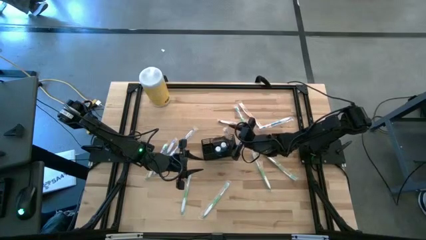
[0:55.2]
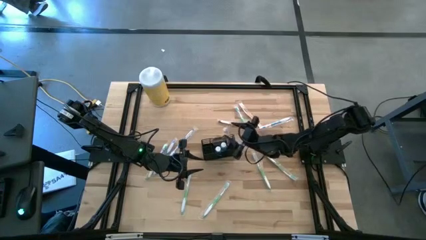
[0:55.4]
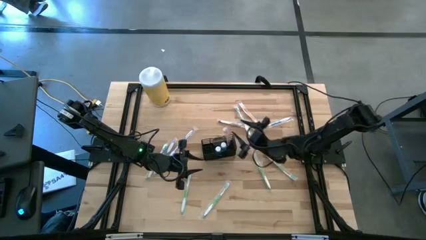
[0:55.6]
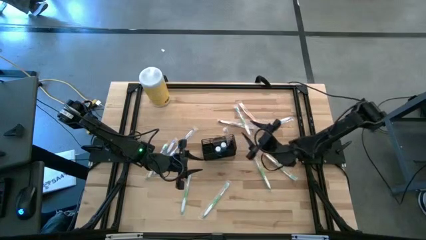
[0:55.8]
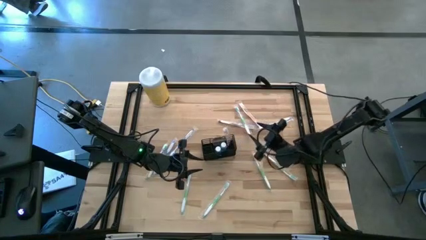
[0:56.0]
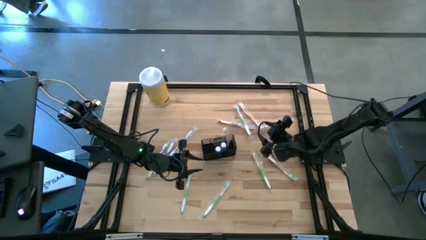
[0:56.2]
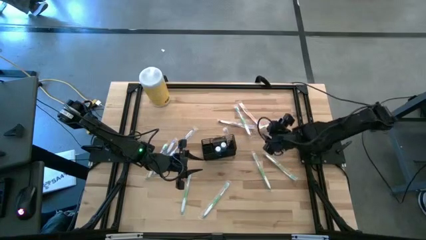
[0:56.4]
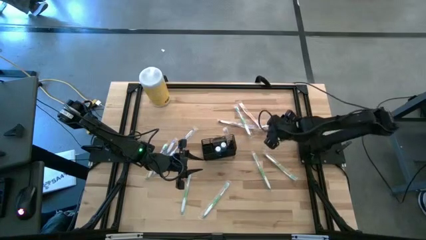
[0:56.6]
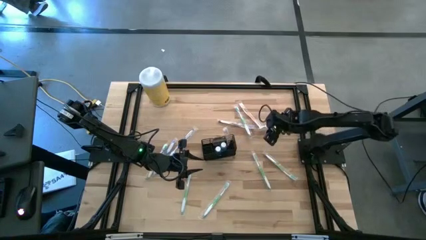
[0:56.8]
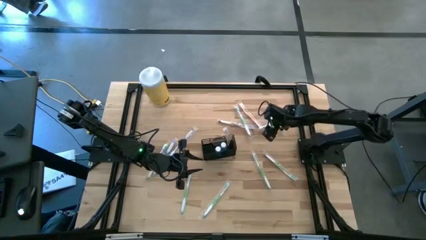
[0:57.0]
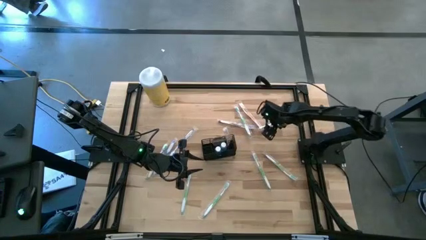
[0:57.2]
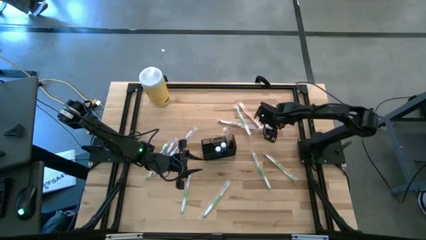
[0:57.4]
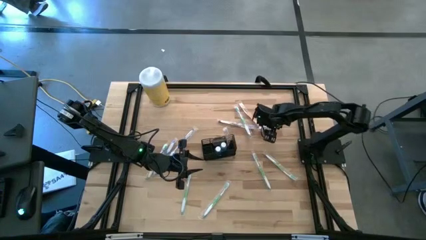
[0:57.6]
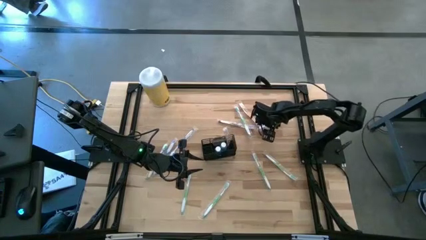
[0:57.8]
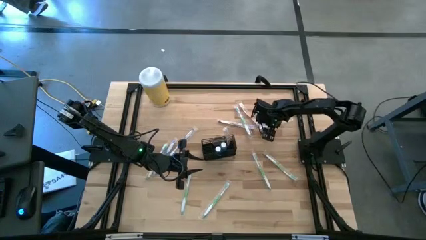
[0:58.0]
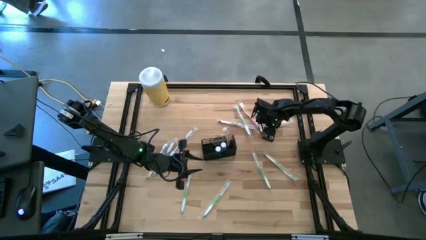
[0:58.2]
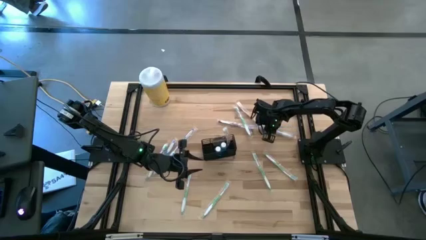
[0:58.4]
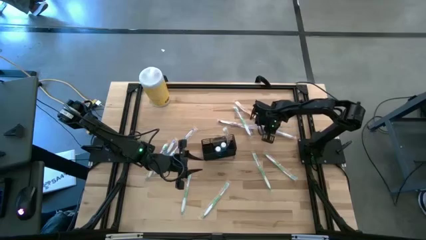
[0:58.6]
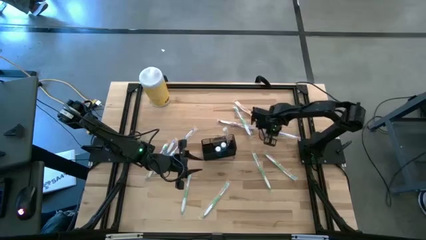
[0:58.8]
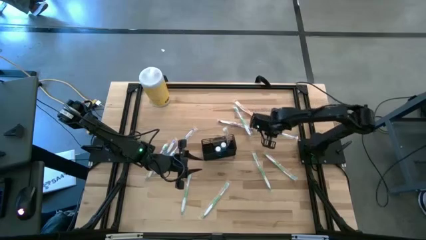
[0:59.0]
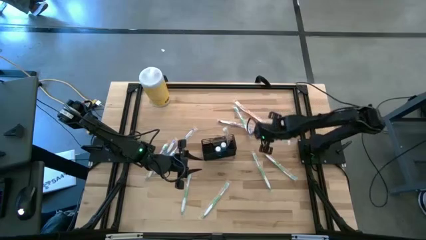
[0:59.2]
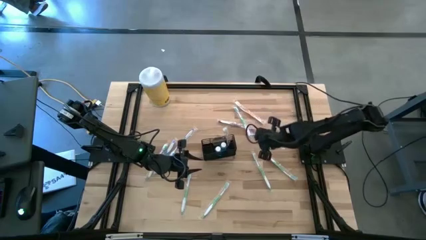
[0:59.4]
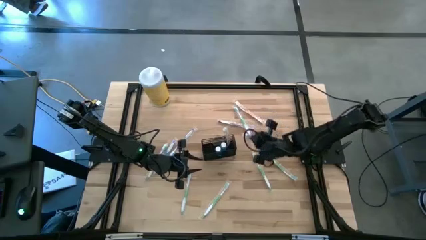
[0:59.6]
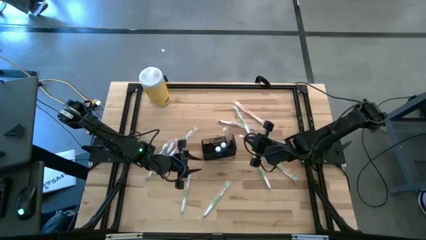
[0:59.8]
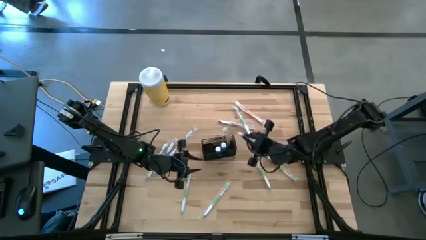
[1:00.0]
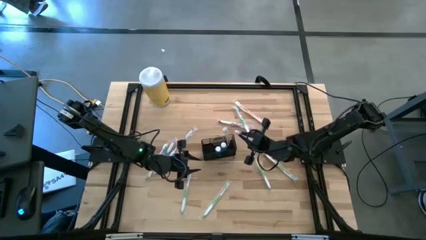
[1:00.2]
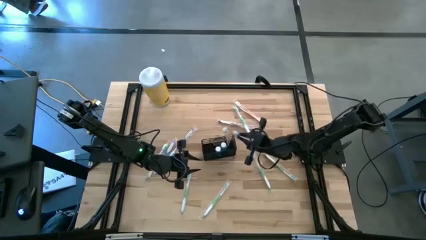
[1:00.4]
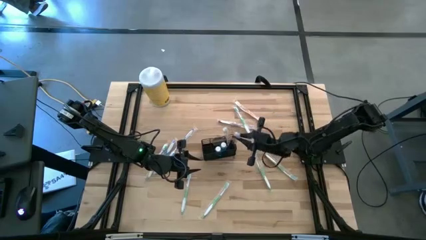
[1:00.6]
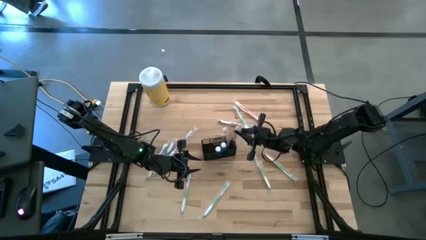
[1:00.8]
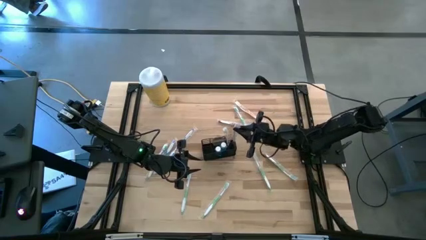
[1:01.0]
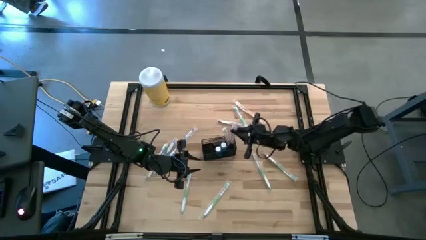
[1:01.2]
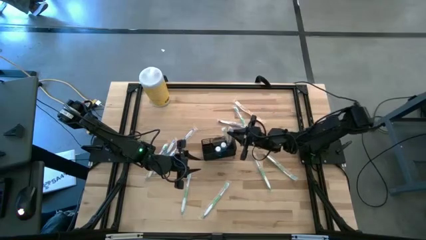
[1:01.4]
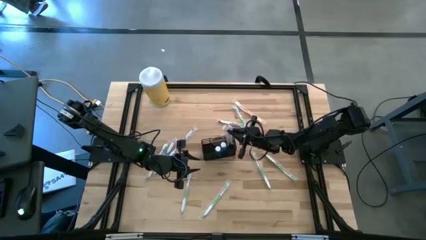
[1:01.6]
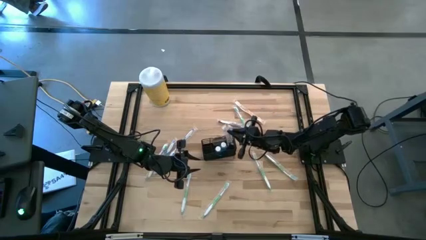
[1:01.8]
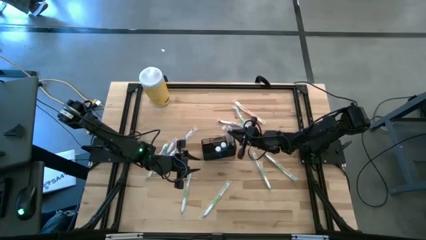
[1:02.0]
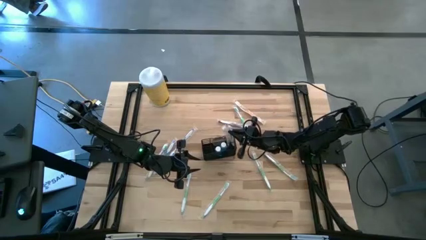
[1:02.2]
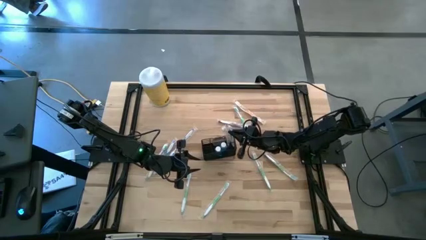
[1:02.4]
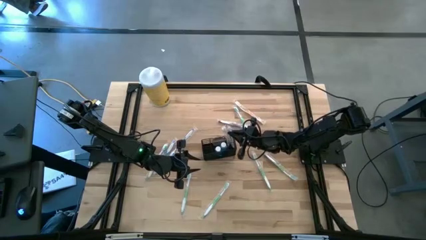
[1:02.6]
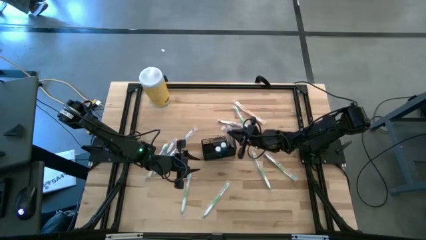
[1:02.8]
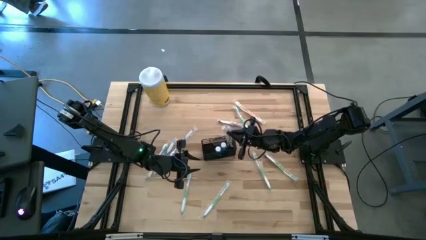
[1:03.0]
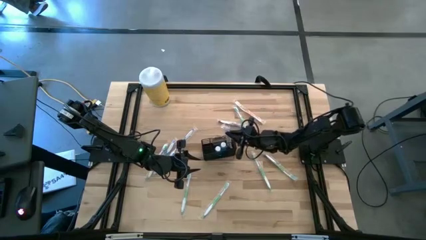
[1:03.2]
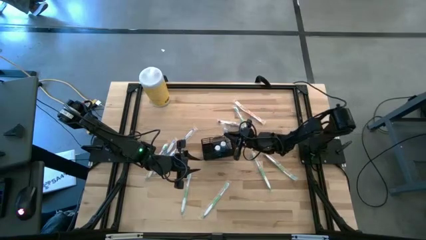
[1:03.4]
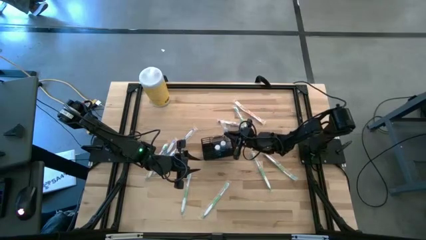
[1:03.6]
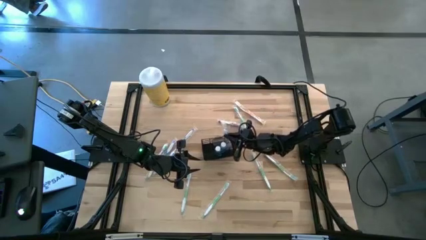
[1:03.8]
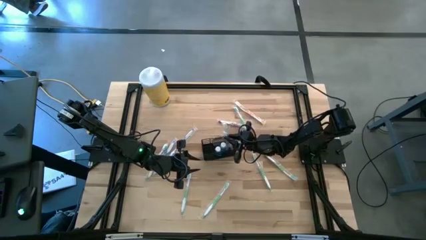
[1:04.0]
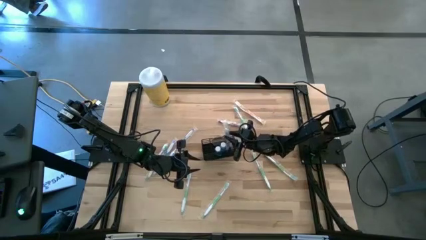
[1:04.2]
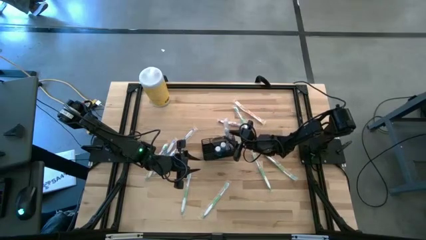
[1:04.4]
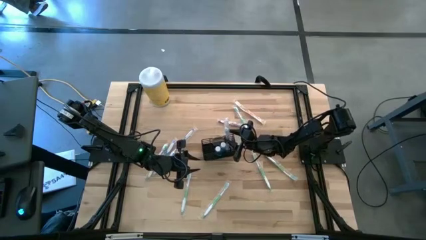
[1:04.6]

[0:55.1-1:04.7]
Task: Pick & Place toothbrushing station
Put the blue toothbrush into the wire organizer

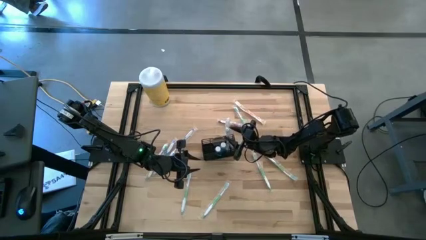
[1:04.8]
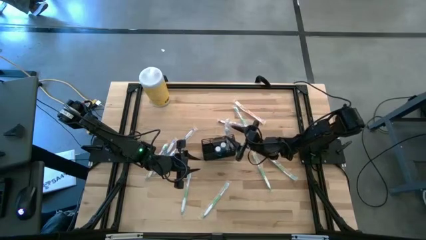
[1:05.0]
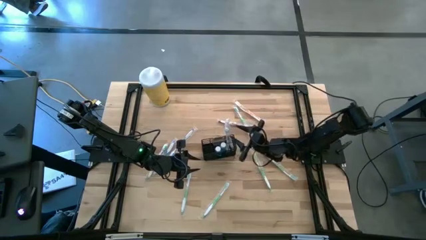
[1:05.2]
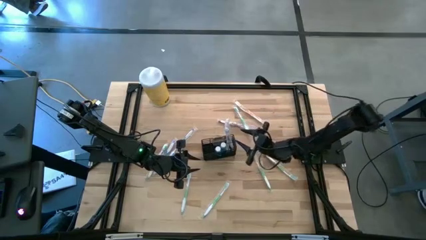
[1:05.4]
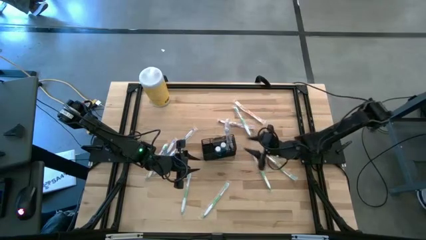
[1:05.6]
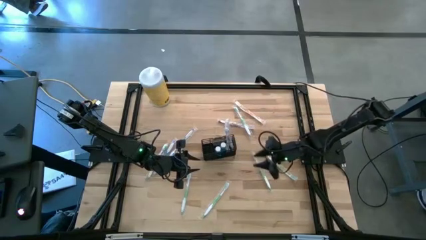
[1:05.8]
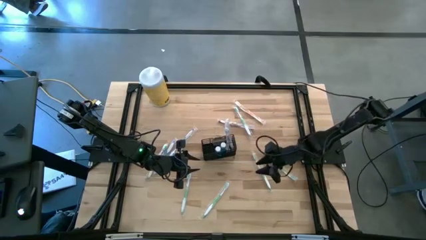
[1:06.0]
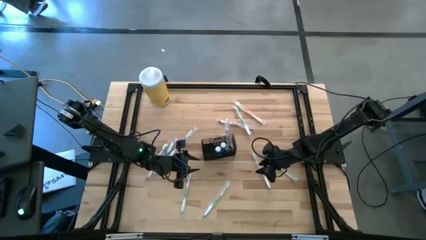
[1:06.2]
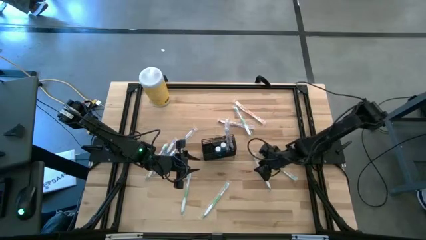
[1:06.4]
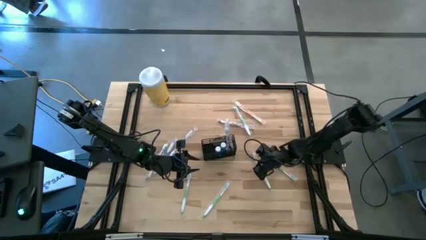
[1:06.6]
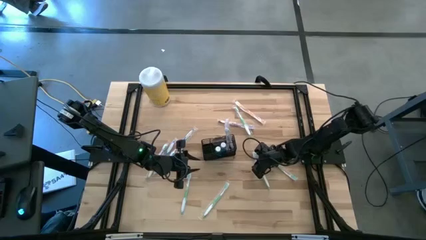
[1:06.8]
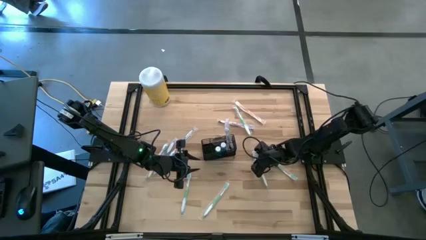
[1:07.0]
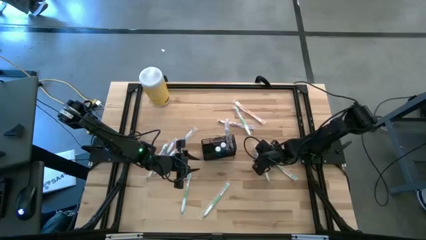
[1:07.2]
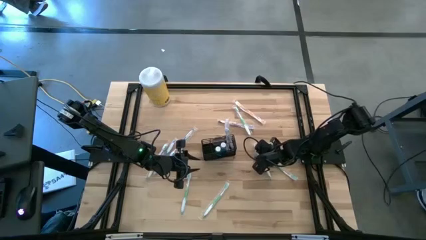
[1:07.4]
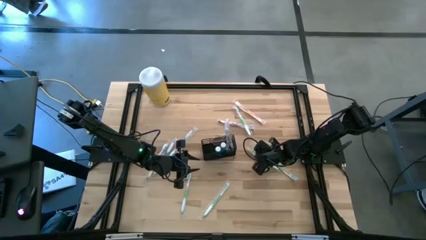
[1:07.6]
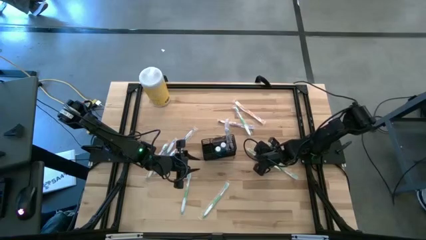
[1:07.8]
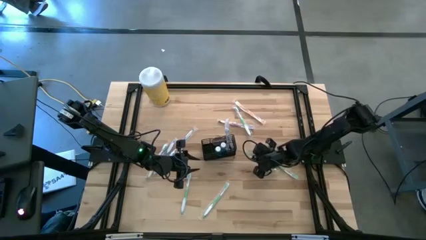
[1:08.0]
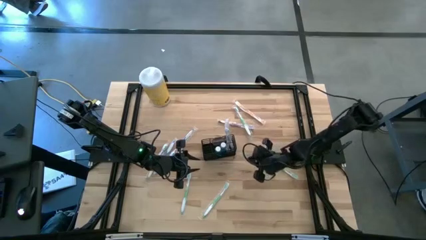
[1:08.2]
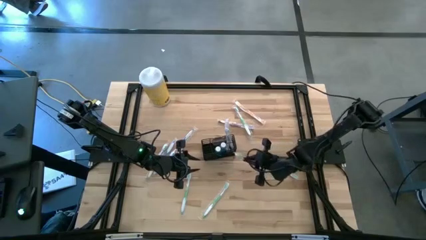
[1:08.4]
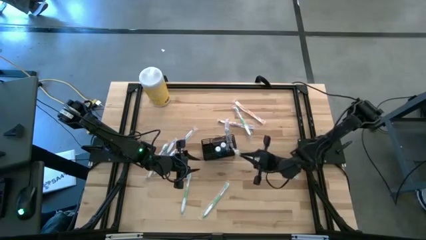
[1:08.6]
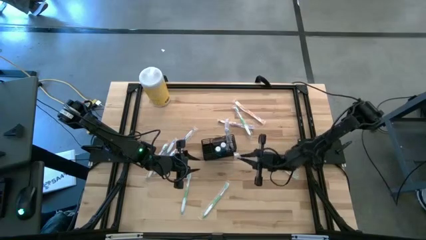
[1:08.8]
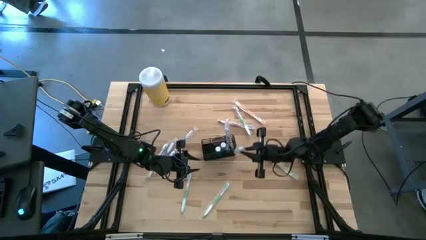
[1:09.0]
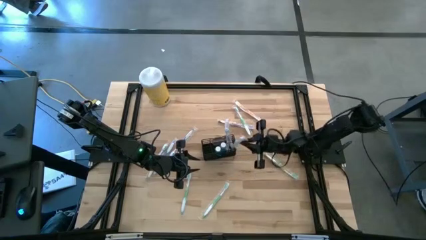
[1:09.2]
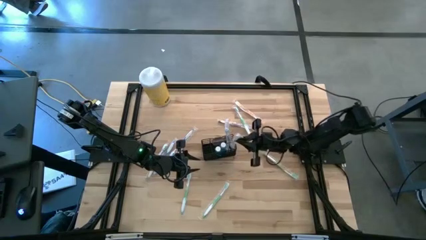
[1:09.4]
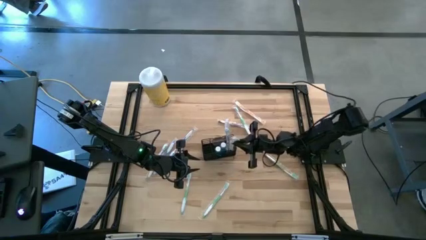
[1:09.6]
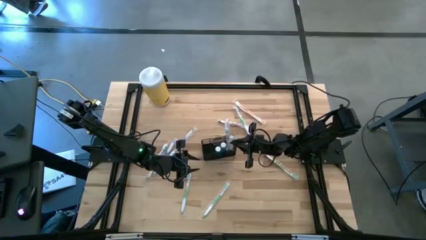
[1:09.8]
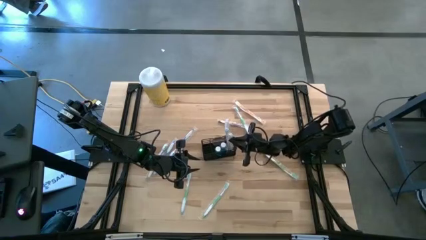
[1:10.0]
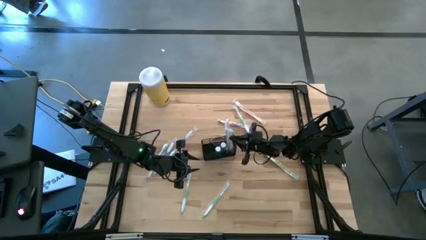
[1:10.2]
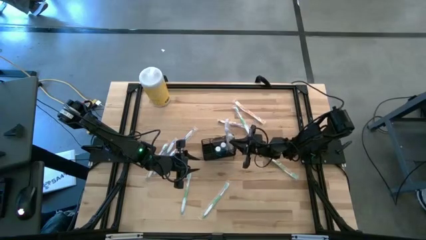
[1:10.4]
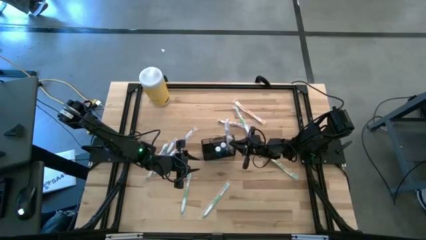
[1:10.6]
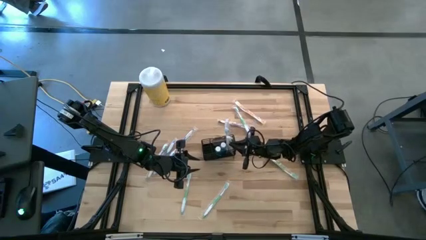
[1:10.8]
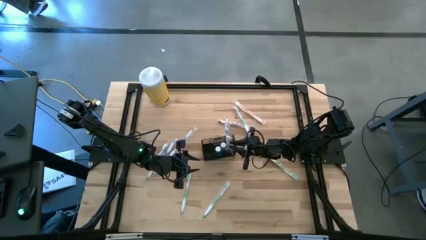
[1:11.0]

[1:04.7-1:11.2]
Put the green toothbrush into the wire organizer

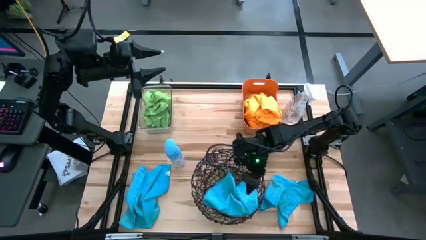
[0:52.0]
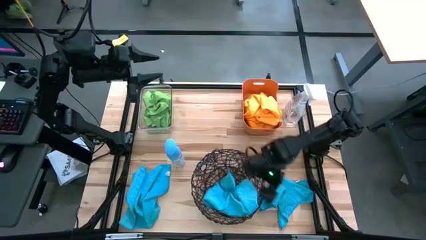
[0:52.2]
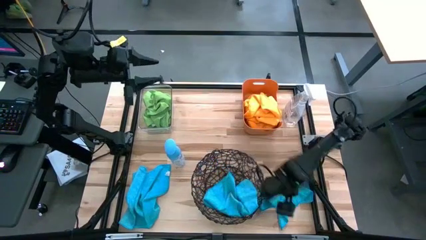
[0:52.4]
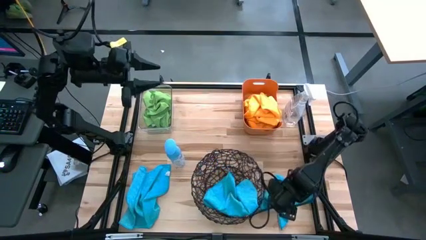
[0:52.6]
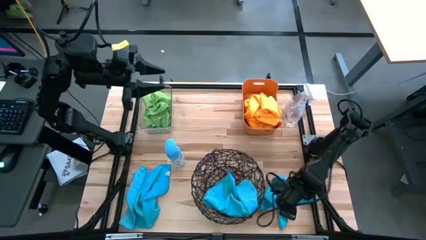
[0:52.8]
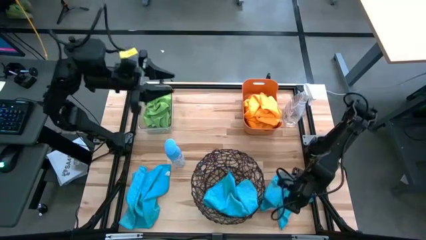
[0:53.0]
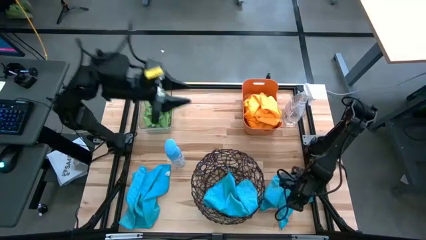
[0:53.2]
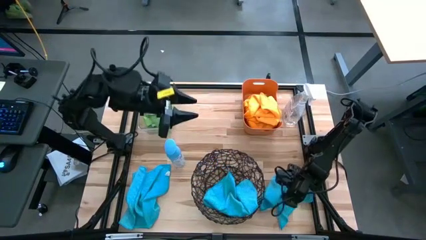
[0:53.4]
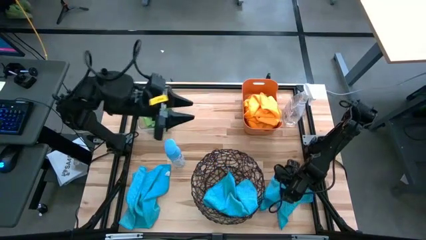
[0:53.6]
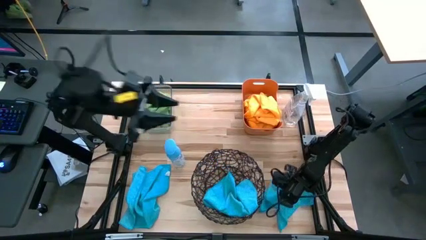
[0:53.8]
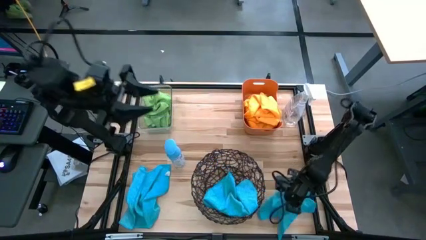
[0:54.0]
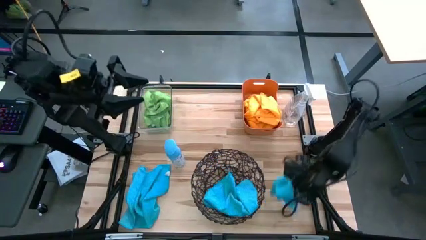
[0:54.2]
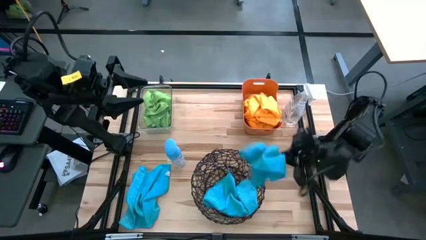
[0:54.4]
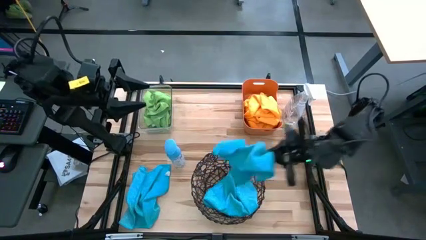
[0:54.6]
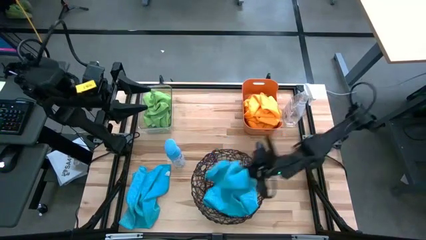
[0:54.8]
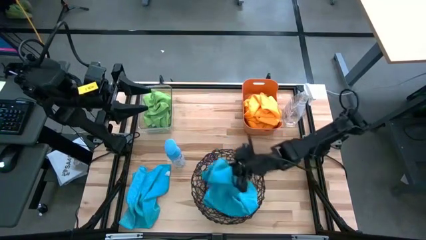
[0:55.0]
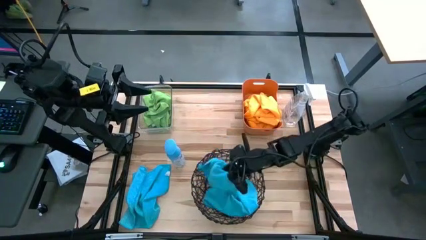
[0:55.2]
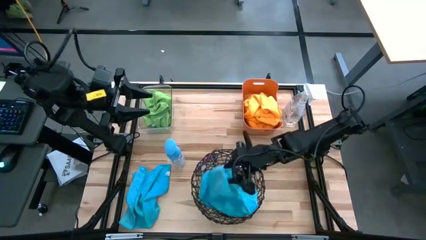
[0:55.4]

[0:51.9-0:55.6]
Task: Sort microfiber towel by color & place in baskets
Put the right blue microfiber cloth into the black wire basket
